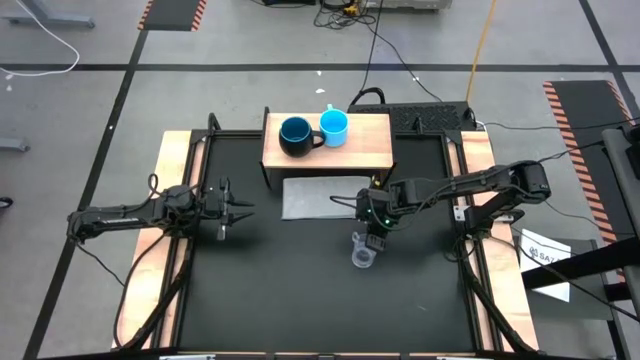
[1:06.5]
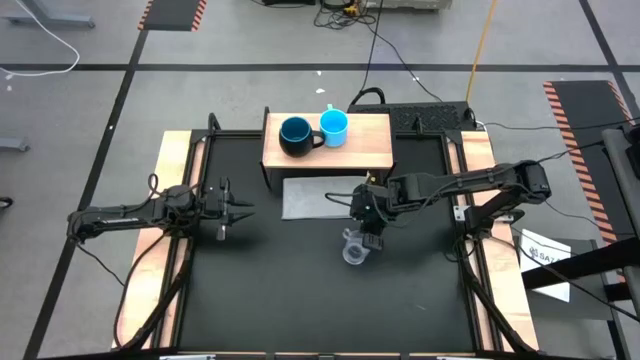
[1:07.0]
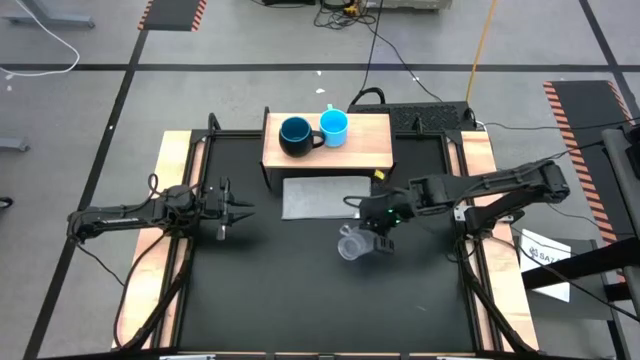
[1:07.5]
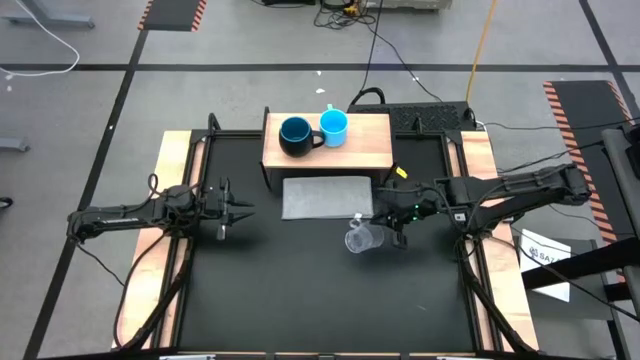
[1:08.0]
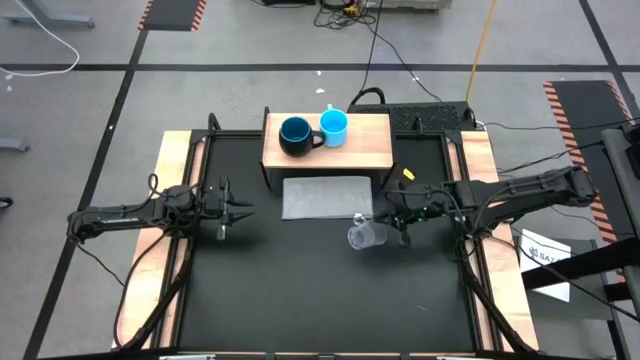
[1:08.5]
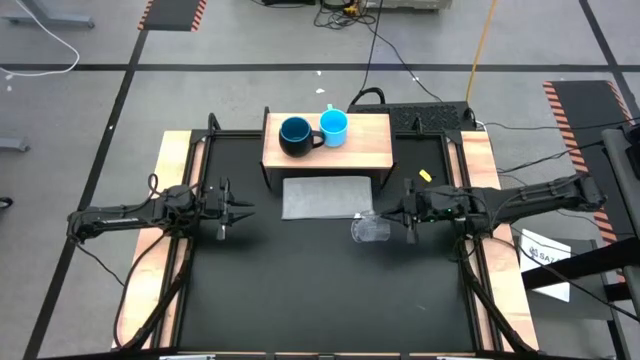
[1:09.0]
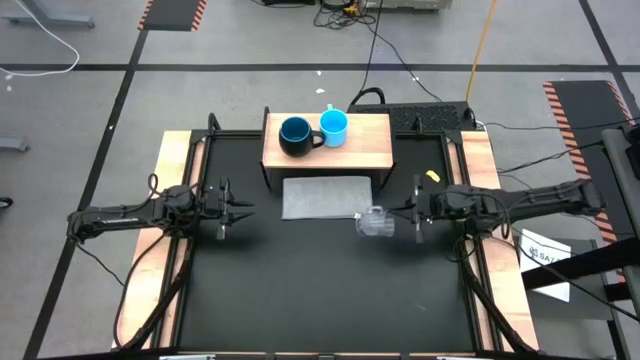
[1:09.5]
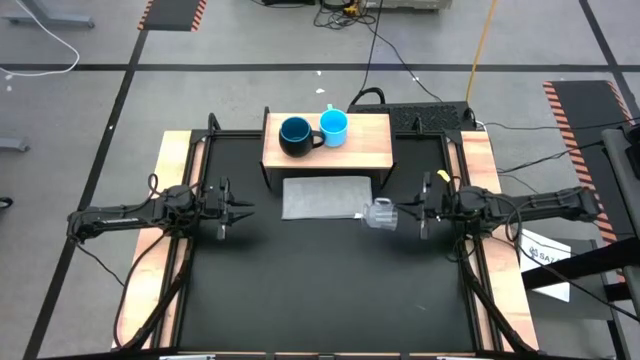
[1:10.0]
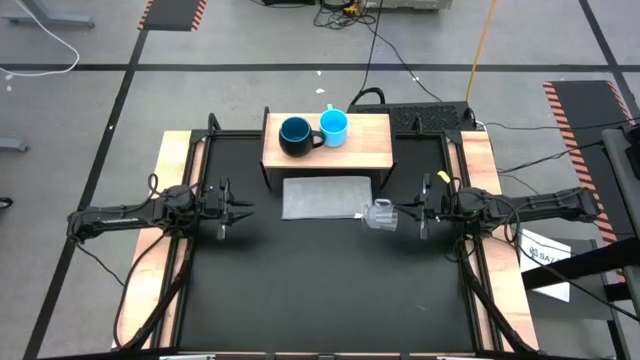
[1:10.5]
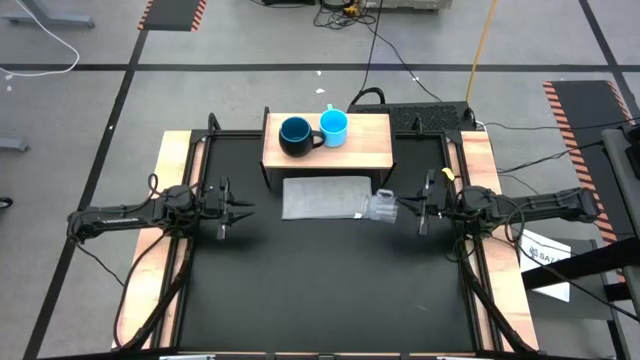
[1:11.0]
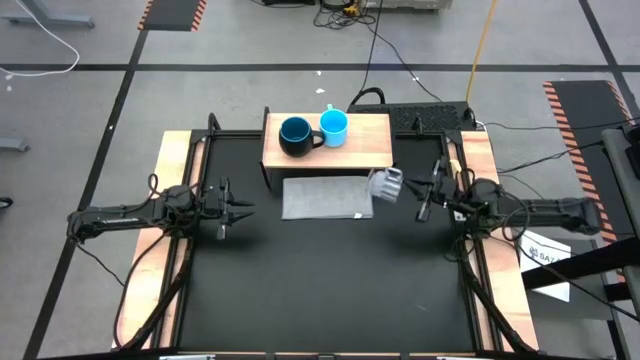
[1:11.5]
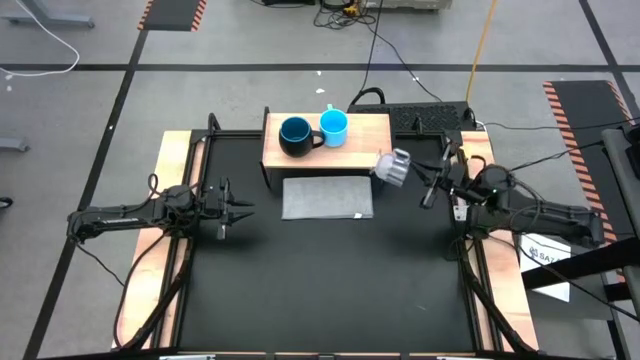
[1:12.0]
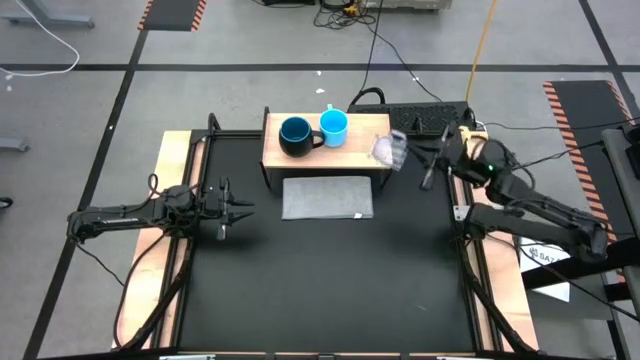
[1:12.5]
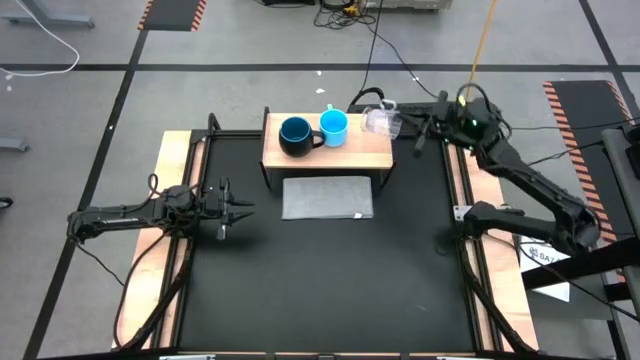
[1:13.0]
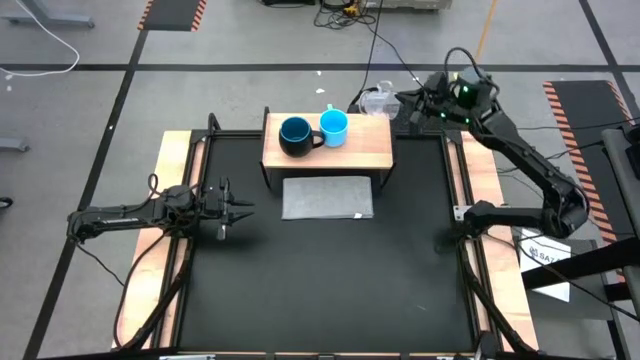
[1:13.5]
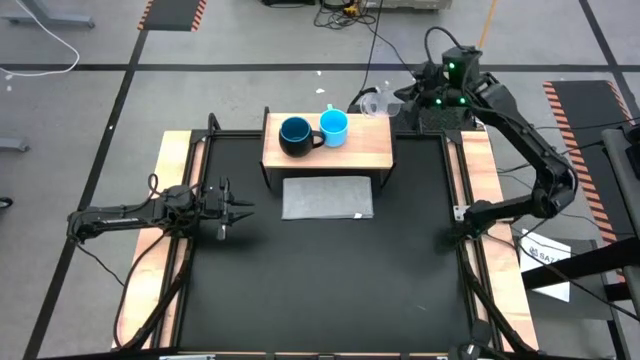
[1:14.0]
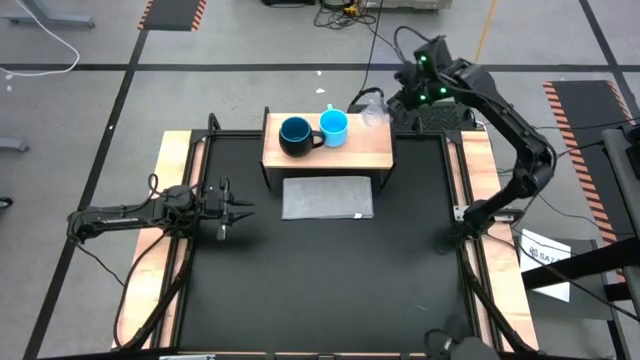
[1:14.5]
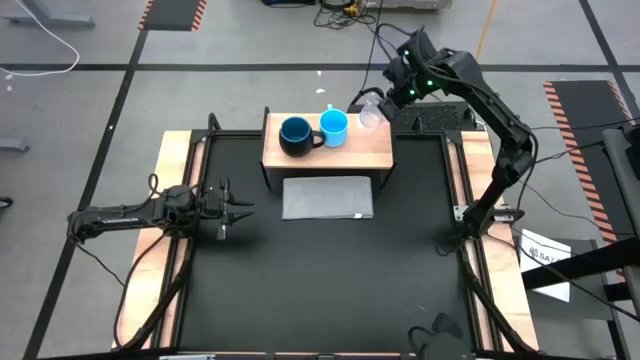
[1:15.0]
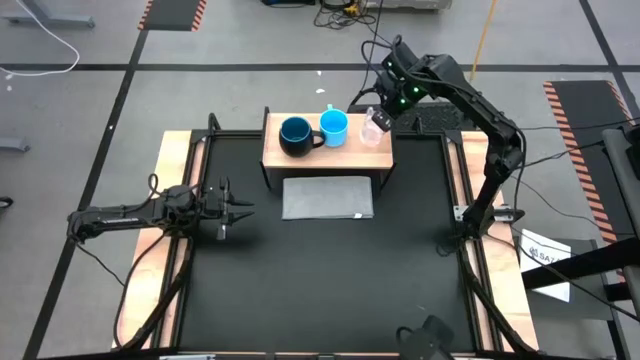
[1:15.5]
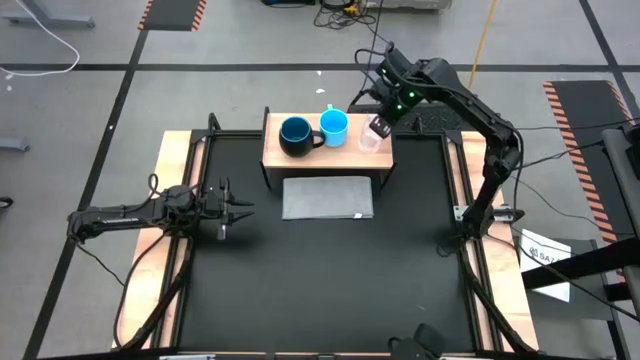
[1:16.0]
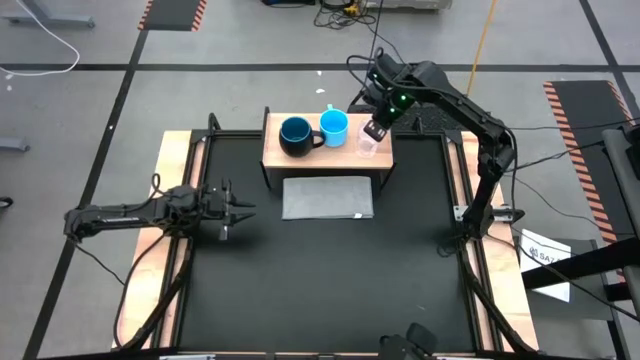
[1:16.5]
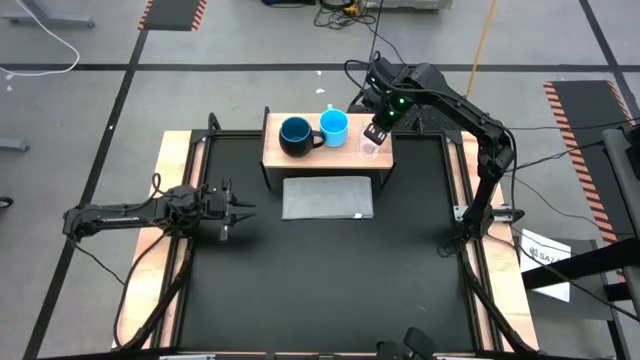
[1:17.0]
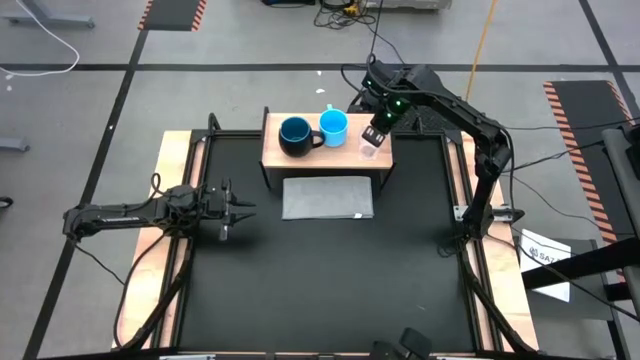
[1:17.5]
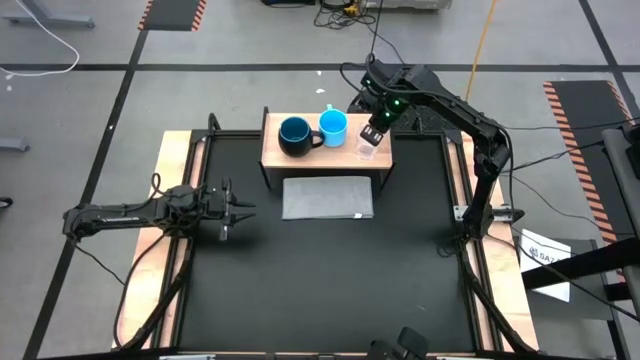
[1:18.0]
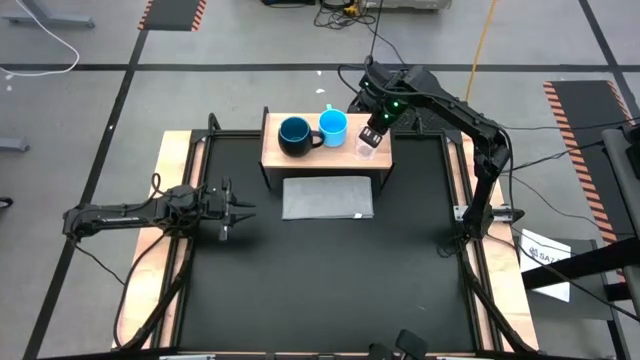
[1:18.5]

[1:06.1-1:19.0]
Task: Stack small to large cups/mugs on shelf
Put the transparent mug on the shelf

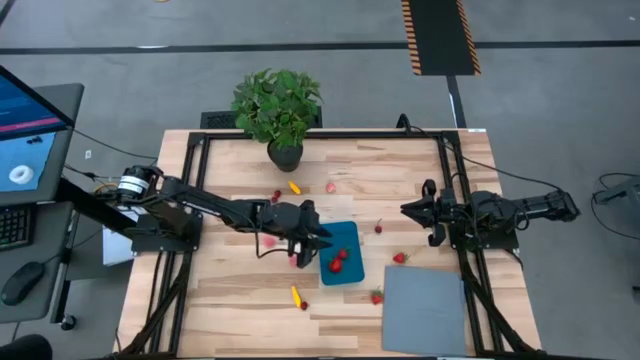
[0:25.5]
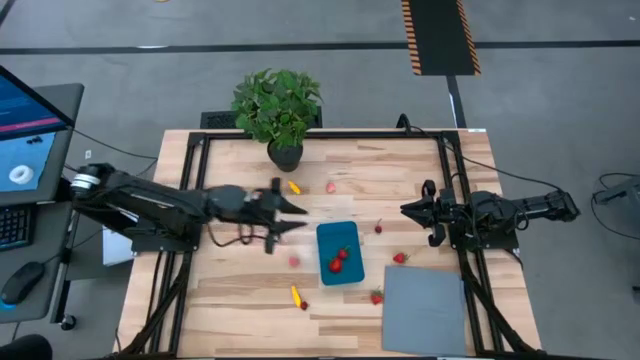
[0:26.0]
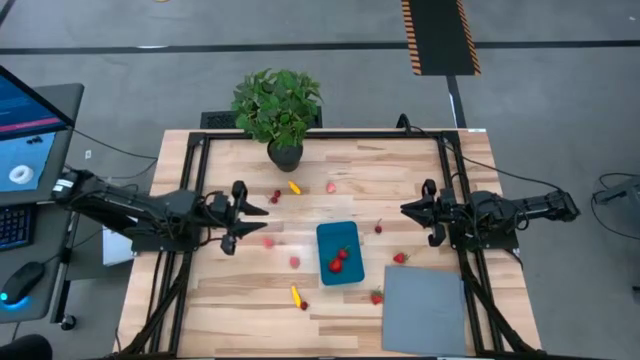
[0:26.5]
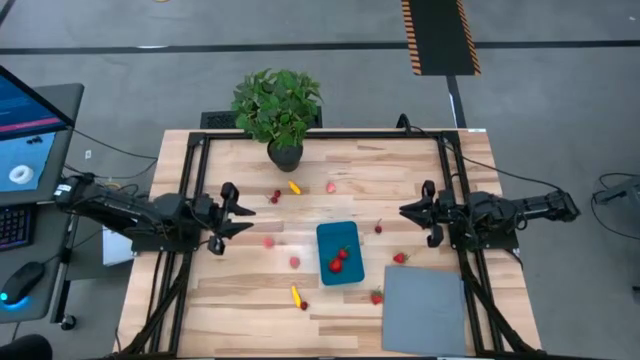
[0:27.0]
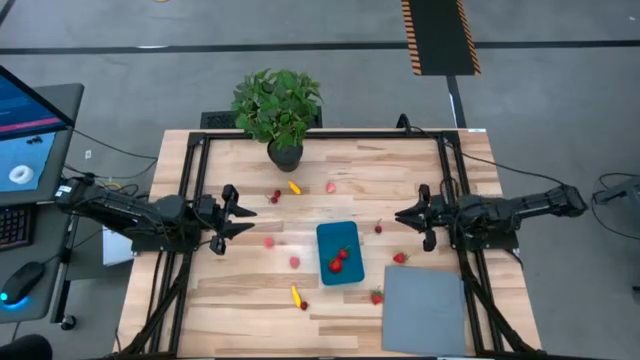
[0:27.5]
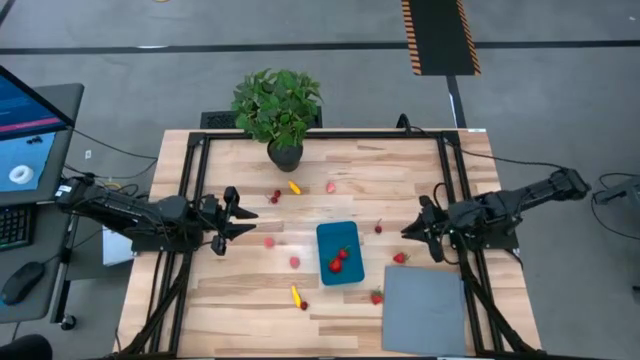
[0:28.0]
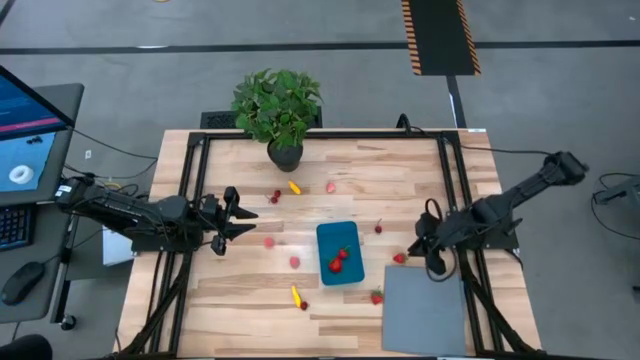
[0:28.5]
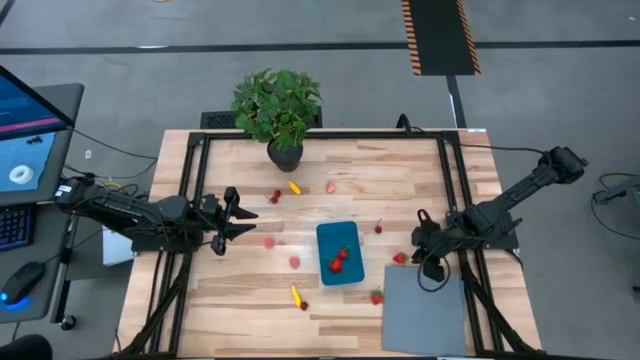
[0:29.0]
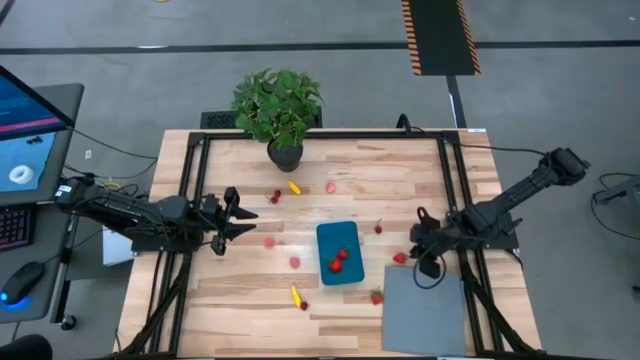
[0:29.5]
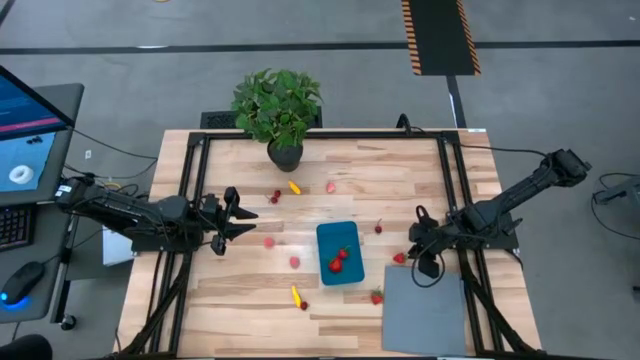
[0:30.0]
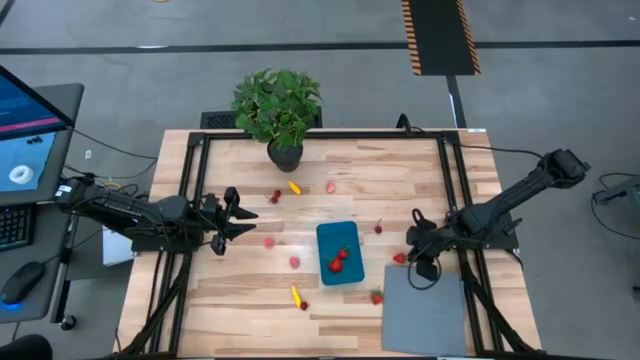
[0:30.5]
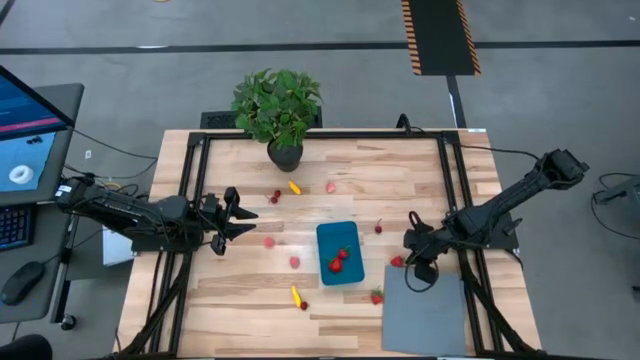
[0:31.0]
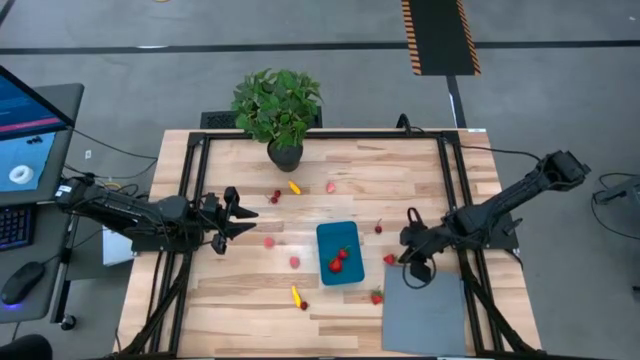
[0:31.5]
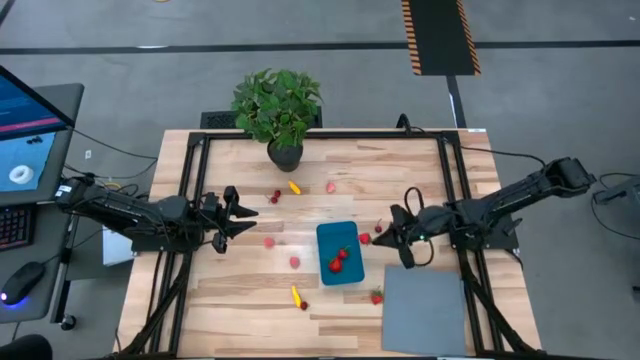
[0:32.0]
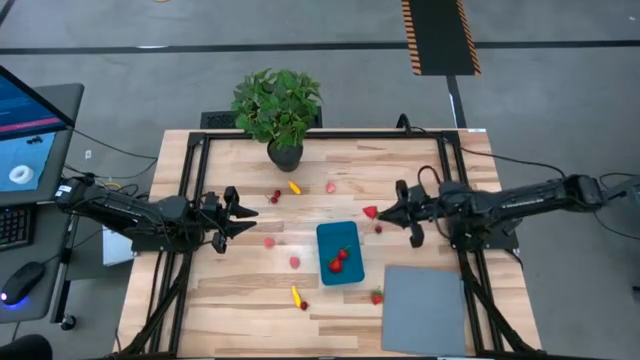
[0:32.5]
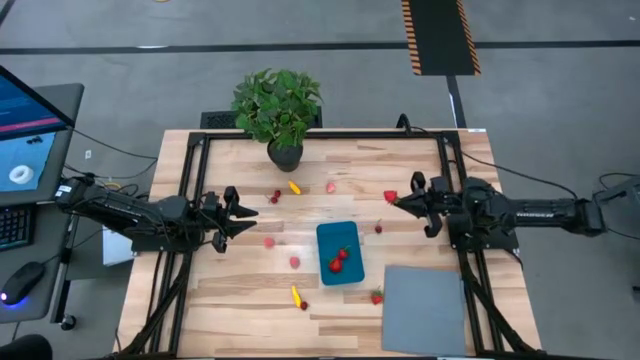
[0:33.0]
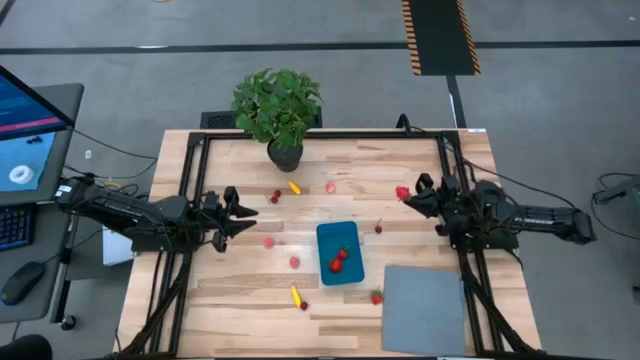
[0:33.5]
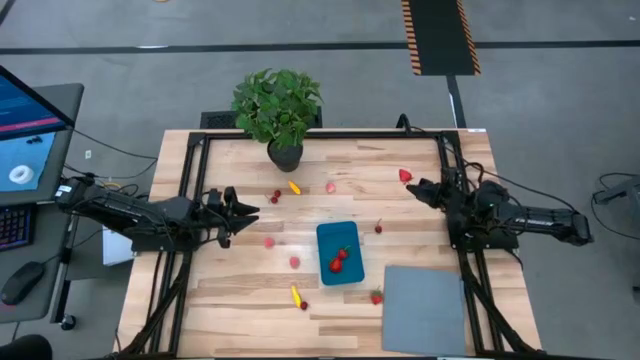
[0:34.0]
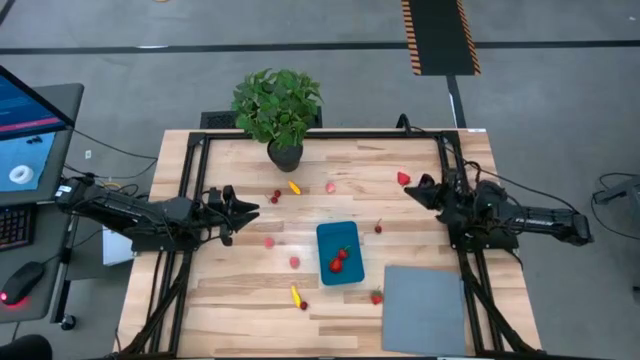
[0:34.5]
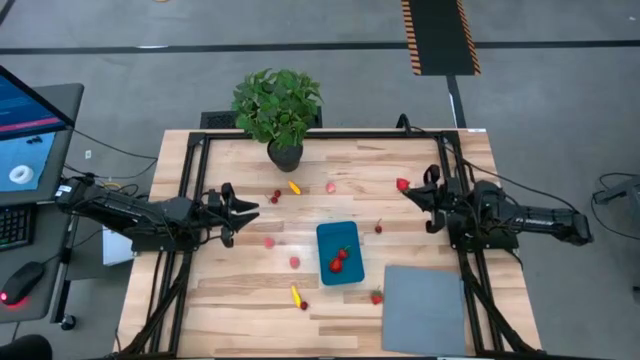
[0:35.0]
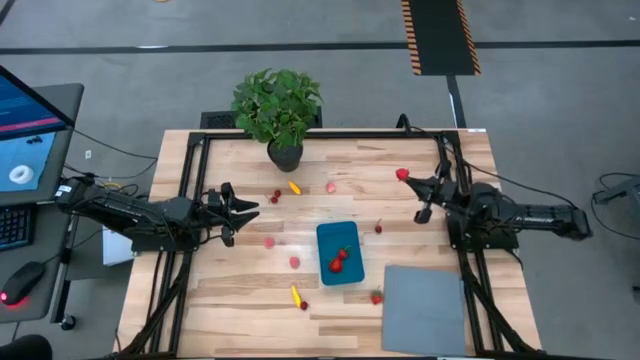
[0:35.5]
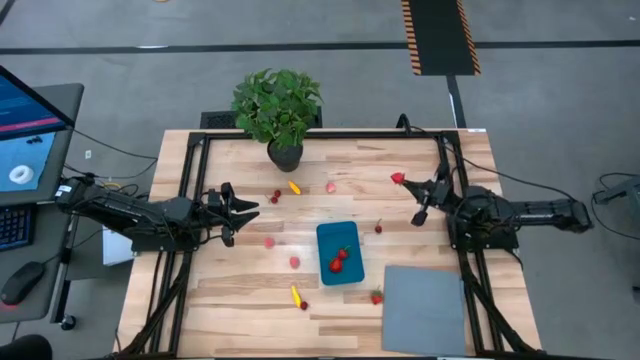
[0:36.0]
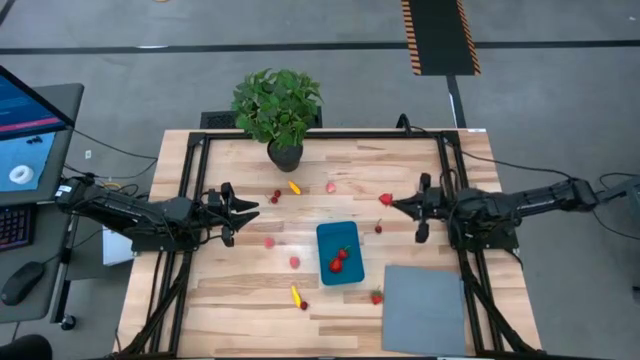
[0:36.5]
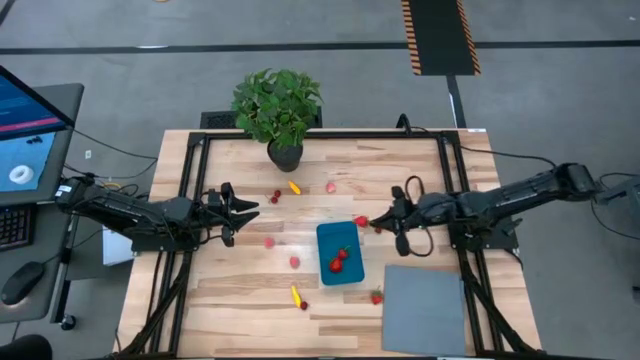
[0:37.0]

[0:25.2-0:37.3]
Task: Pick and placing Produce into tupperware
Put the top strawberry into the blue bin
